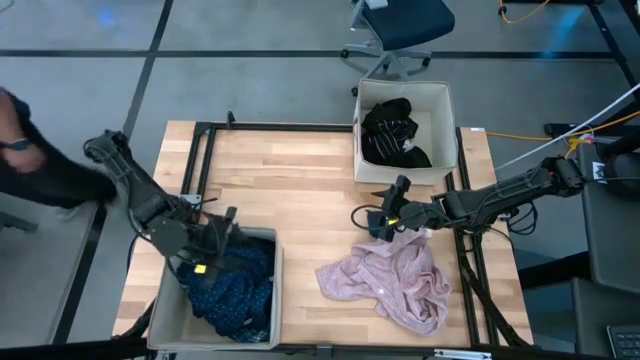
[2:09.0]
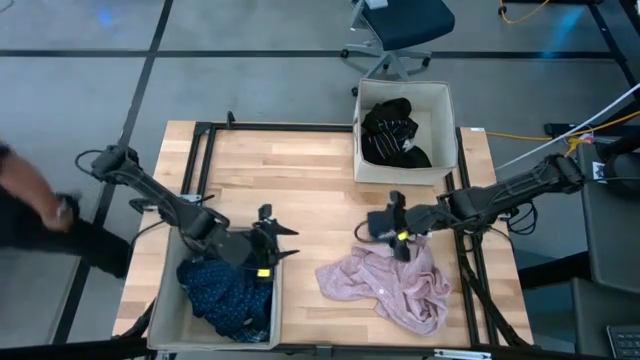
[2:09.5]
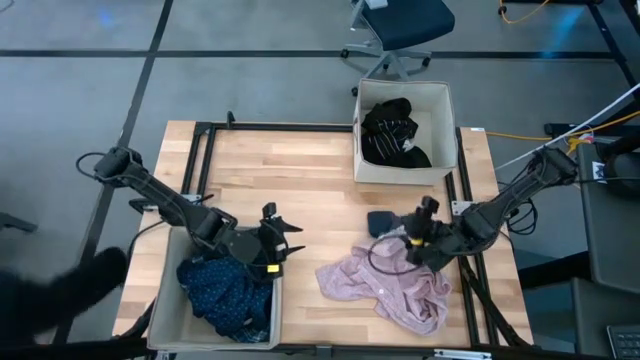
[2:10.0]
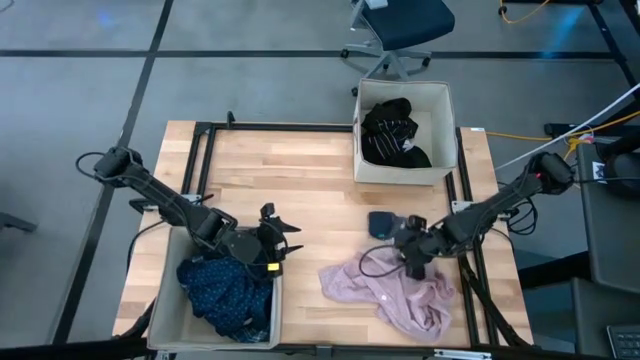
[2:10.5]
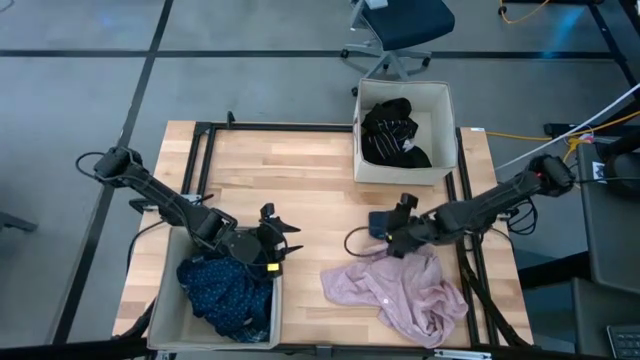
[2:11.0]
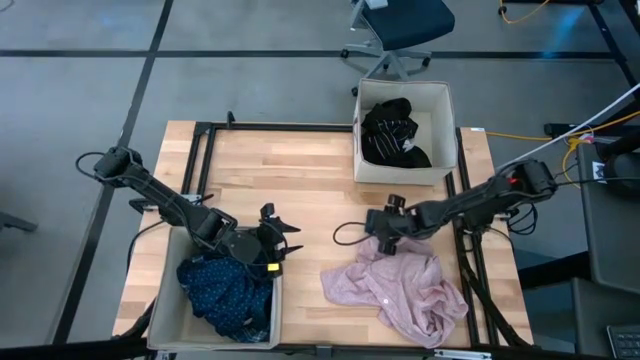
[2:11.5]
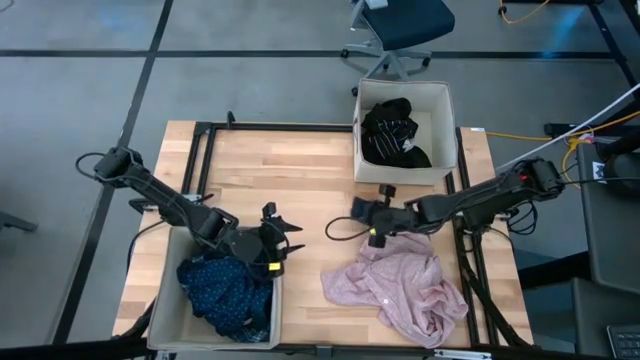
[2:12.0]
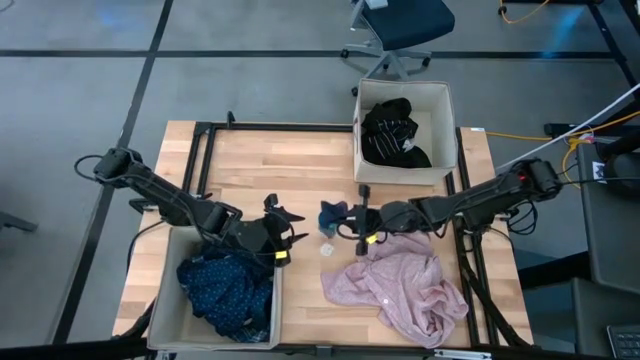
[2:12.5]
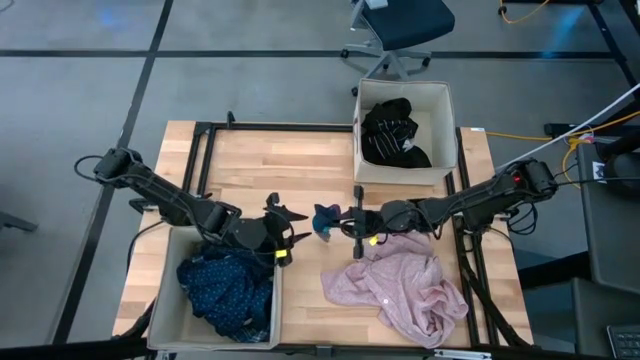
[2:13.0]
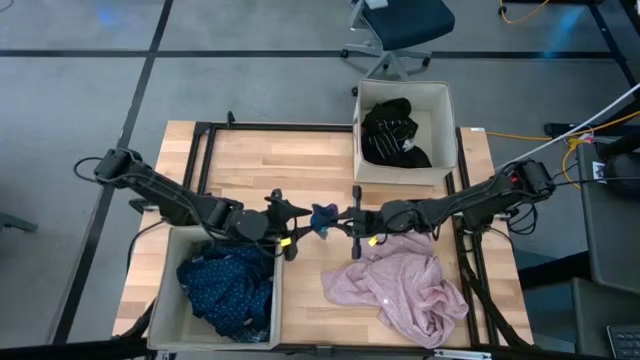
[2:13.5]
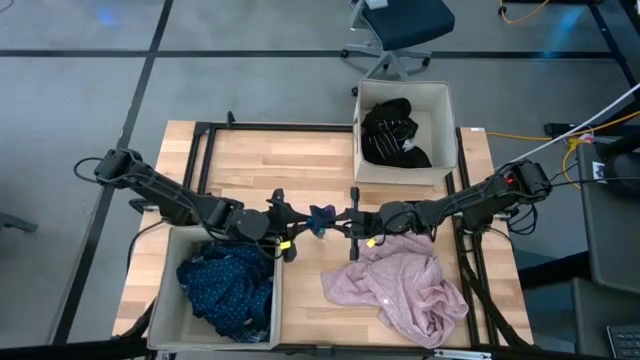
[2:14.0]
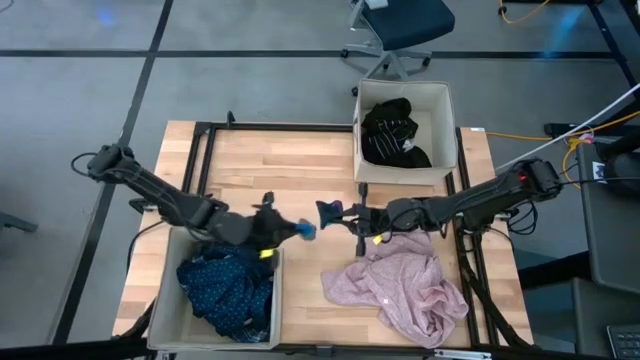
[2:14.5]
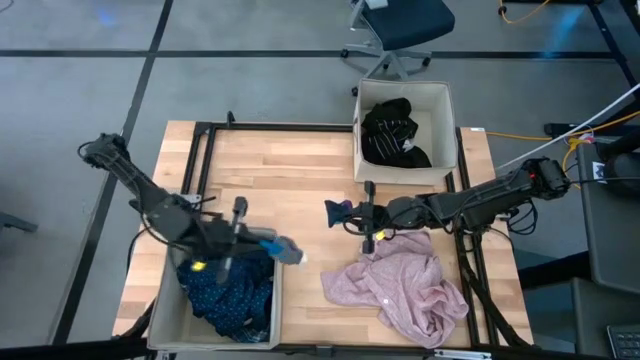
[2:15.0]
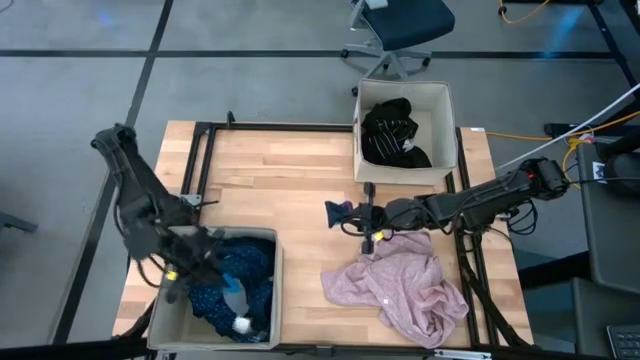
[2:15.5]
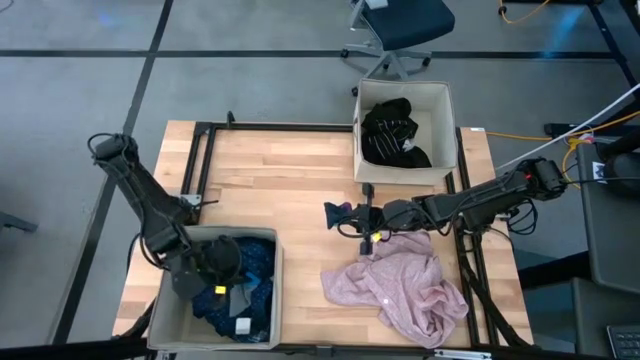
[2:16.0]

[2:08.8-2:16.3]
Task: Sort clothes
Put the gray sock into the bottom laundry organizer

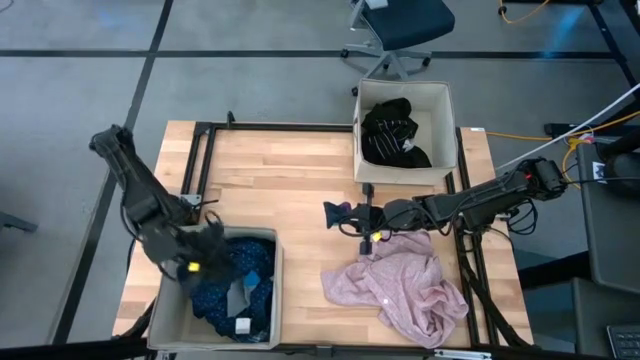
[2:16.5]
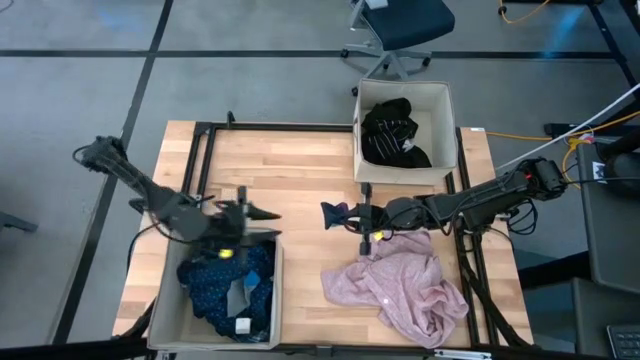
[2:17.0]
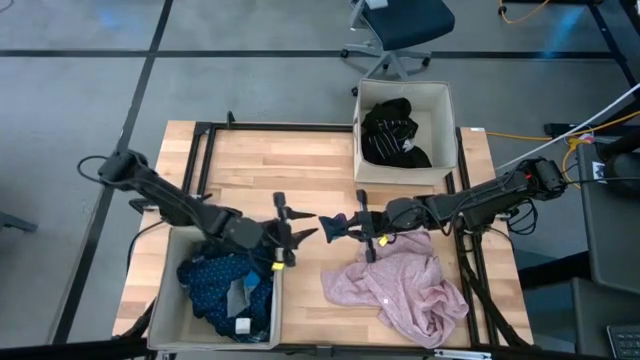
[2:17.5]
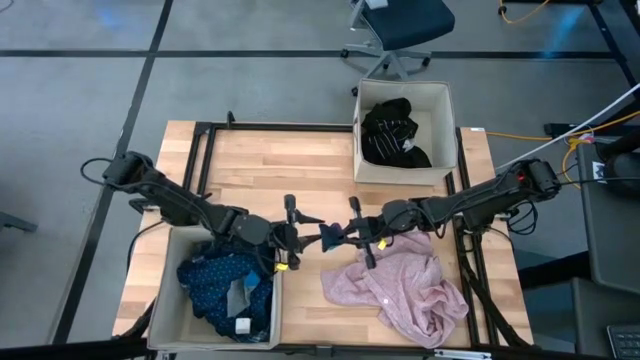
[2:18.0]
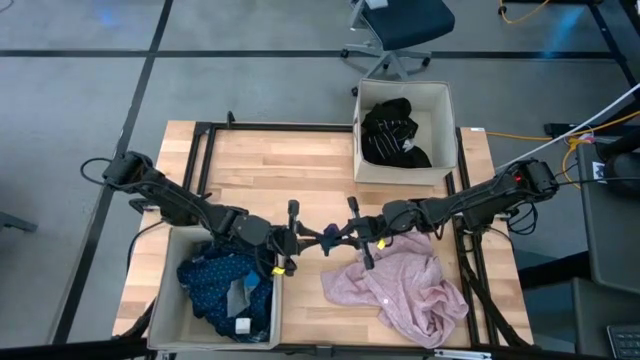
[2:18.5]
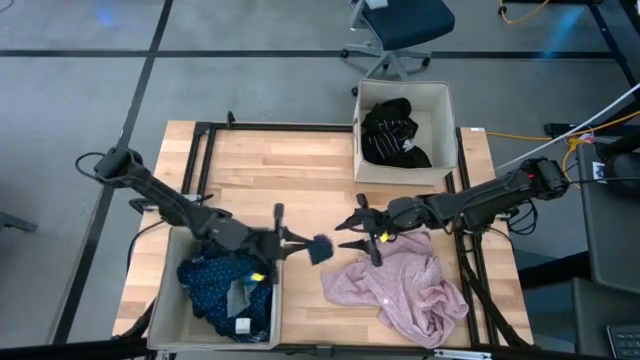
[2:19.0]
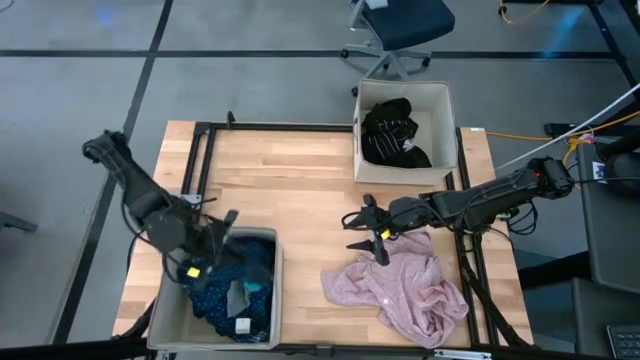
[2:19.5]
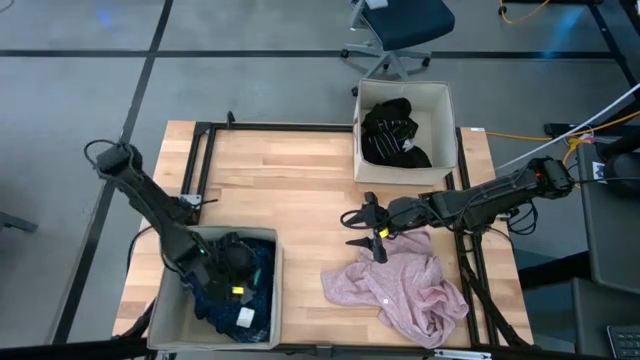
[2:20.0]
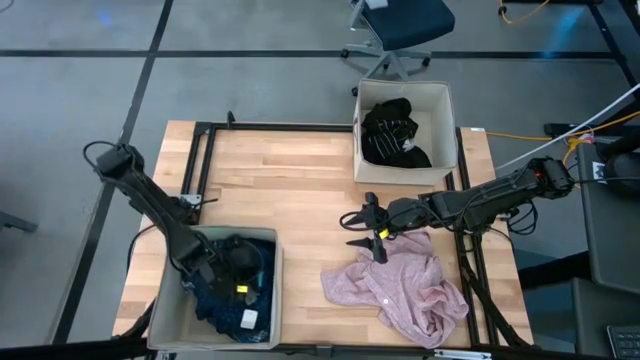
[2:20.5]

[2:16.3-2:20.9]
Put the blue sock into the bottom laundry organizer

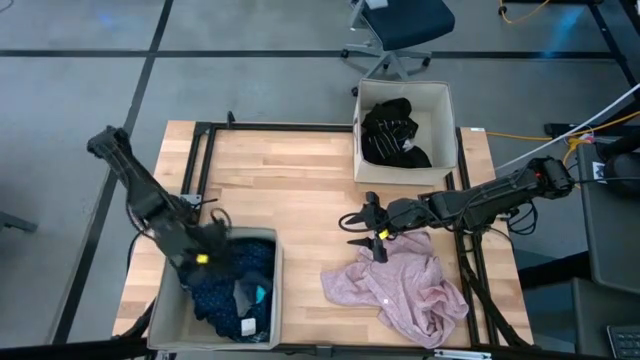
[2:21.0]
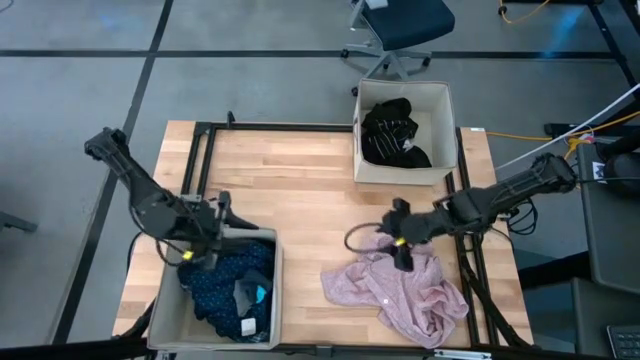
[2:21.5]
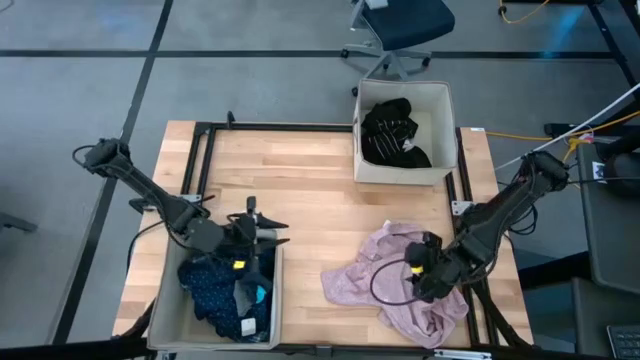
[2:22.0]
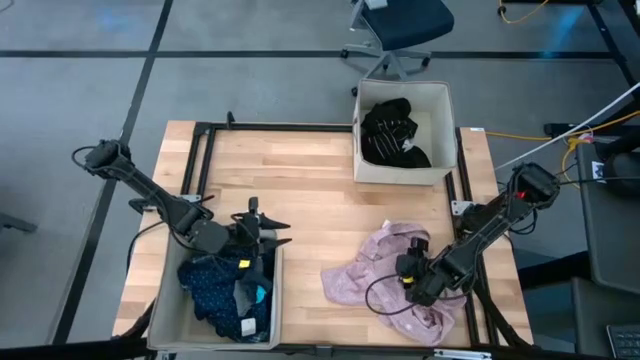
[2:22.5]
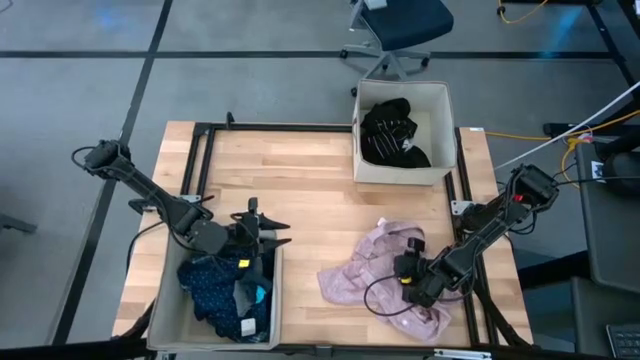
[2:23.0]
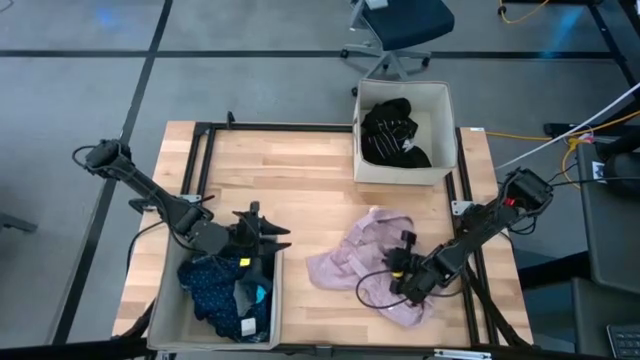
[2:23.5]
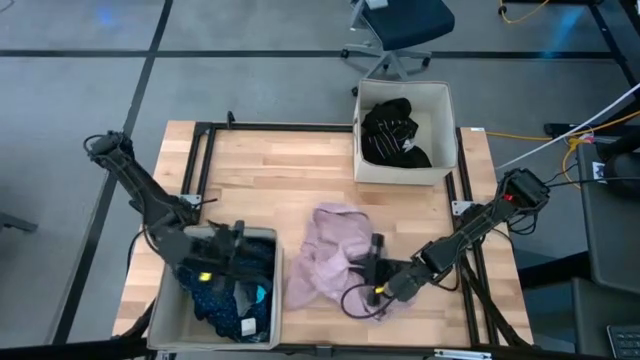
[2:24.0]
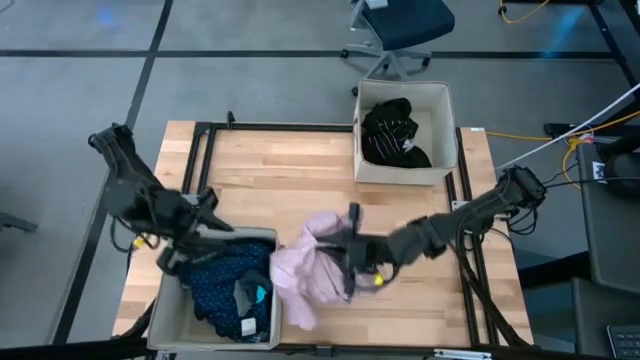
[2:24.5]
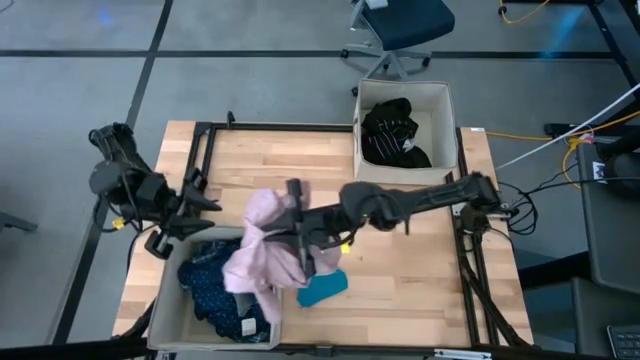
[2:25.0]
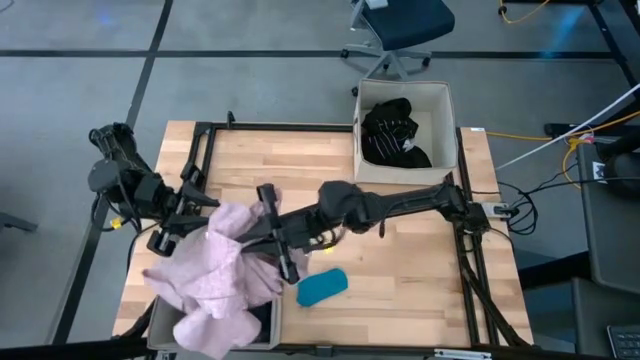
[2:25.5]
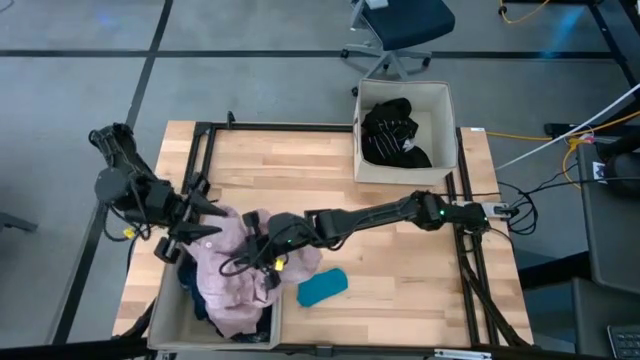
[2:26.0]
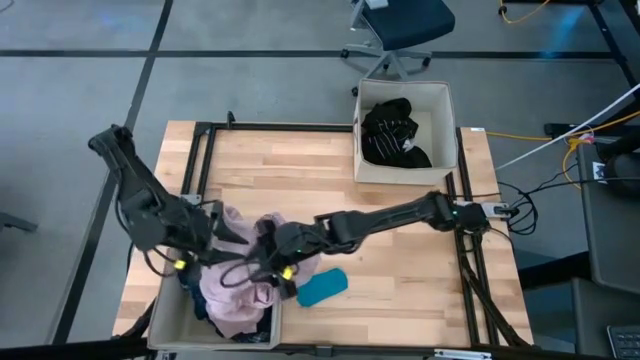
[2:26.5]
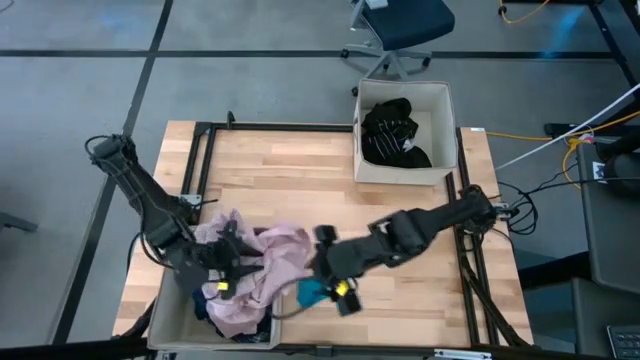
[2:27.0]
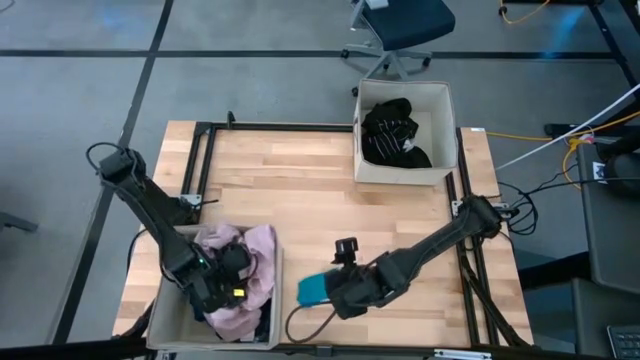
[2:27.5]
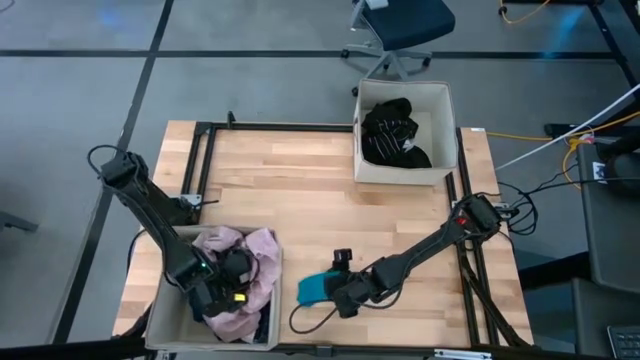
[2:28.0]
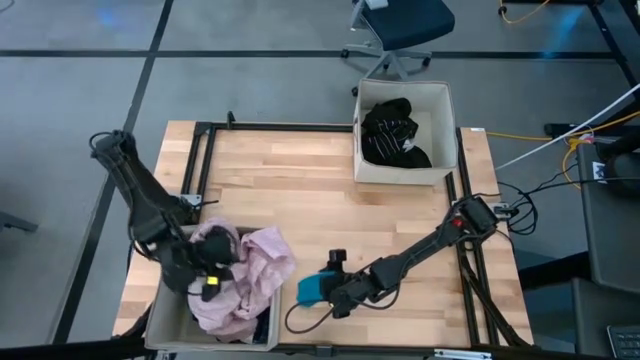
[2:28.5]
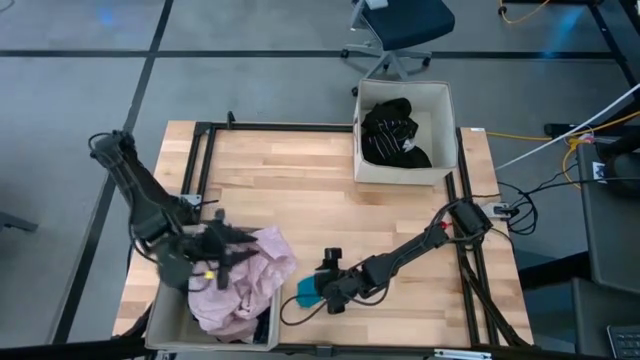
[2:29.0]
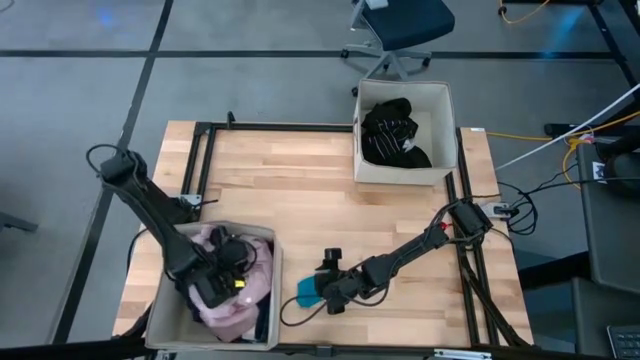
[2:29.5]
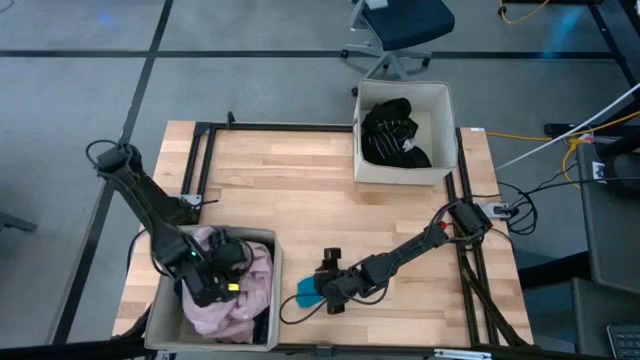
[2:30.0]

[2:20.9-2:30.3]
Put the pink polo shirt into the bottom laundry organizer

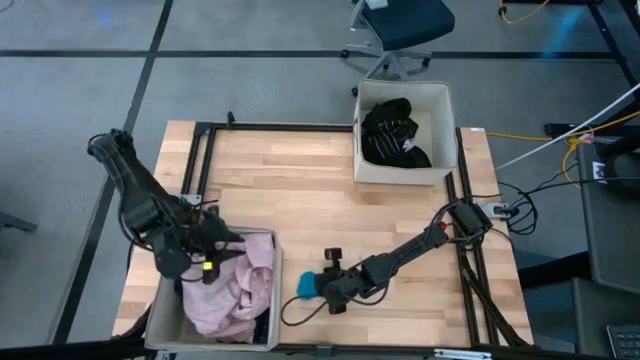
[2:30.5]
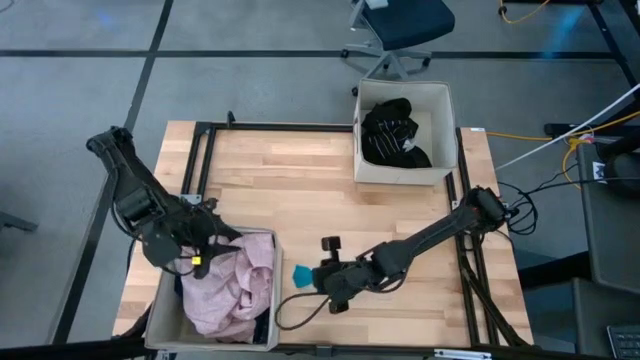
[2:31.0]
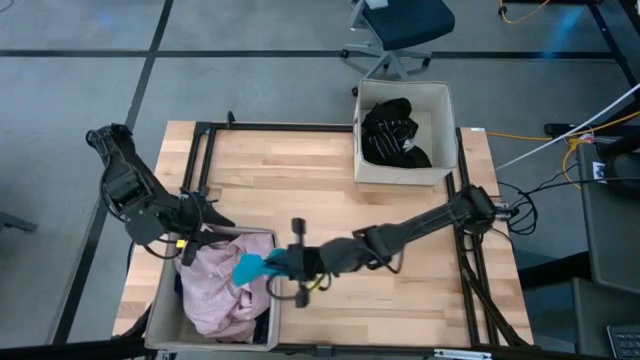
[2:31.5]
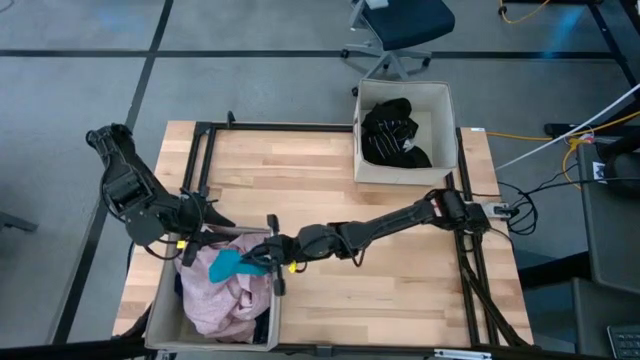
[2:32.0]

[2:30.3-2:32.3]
Put the blue sock into the bottom laundry organizer
